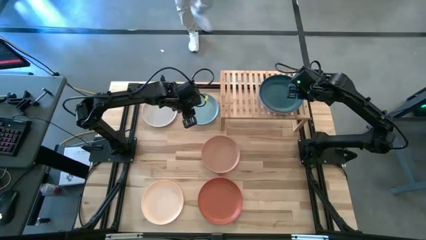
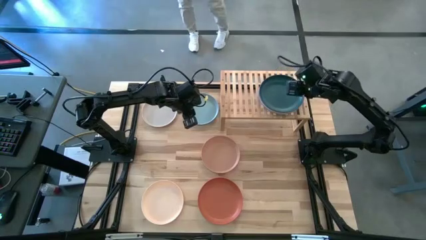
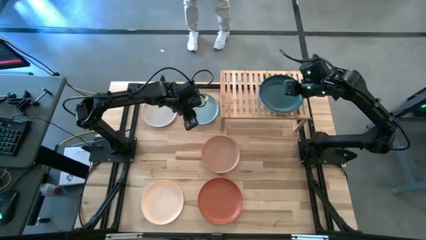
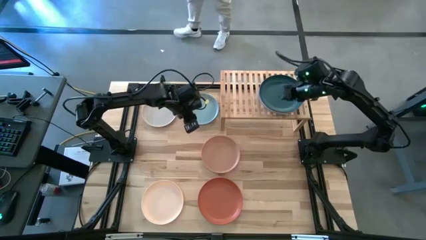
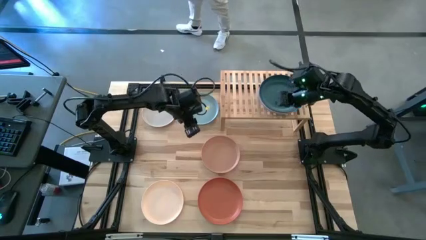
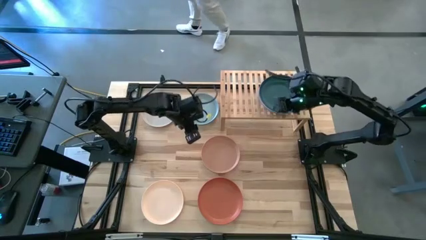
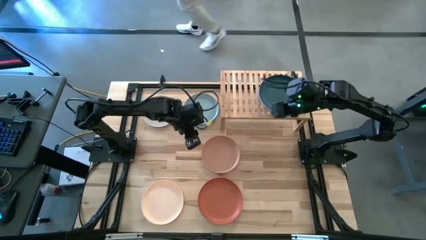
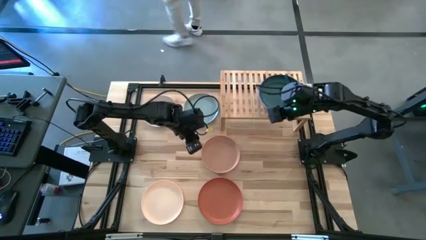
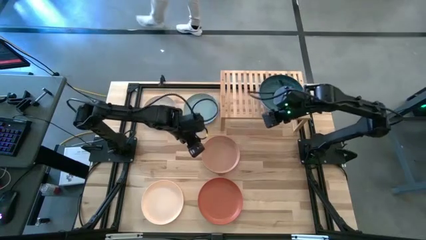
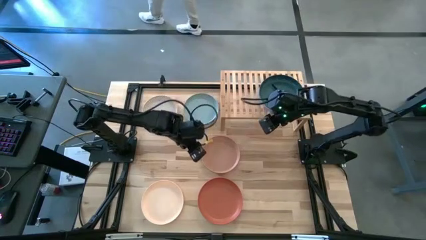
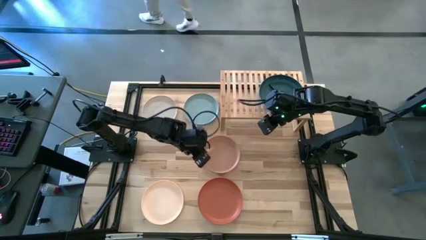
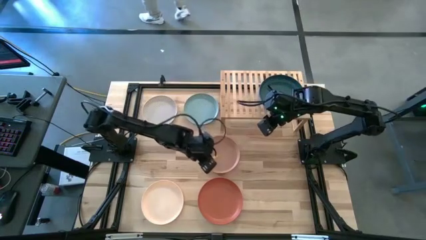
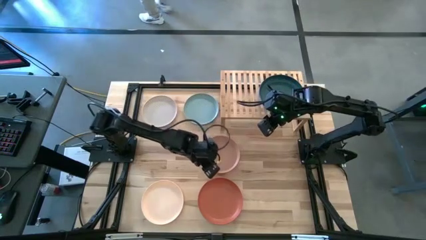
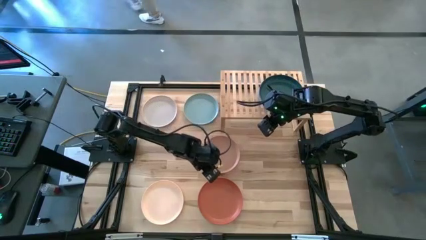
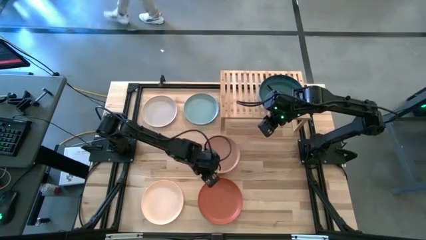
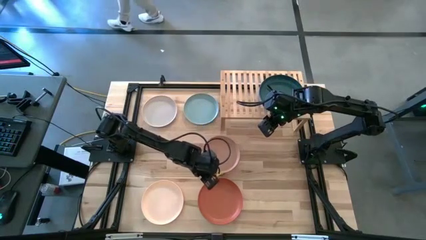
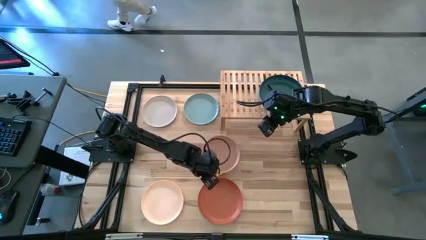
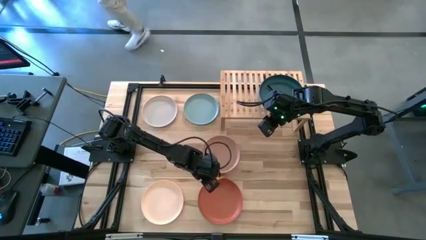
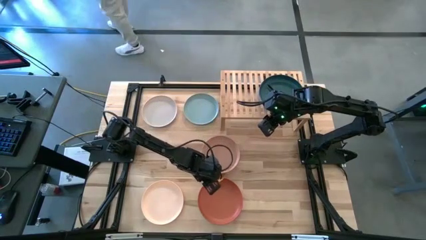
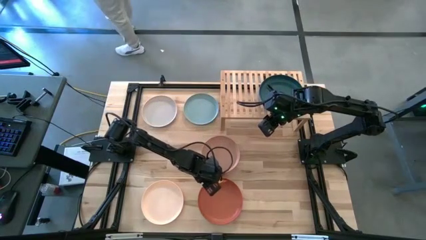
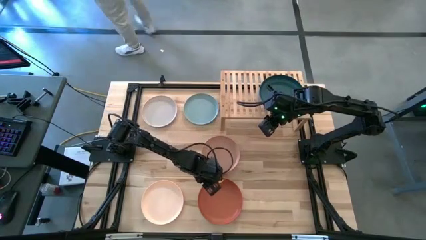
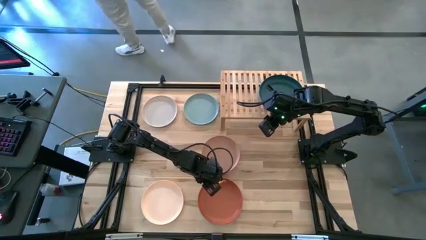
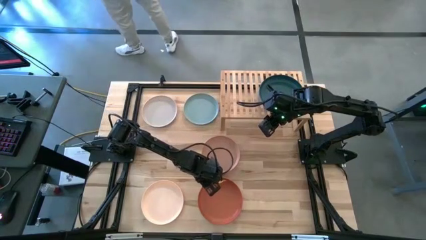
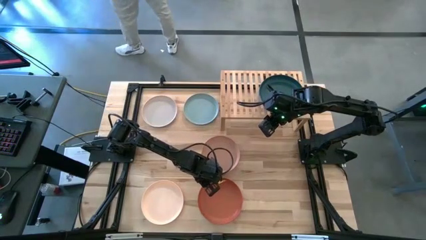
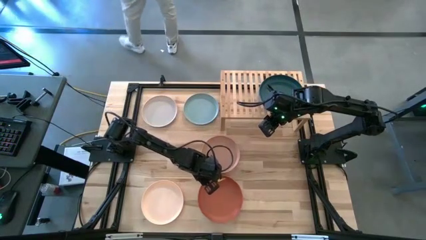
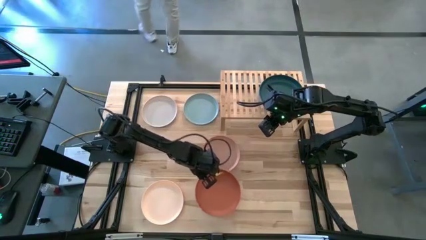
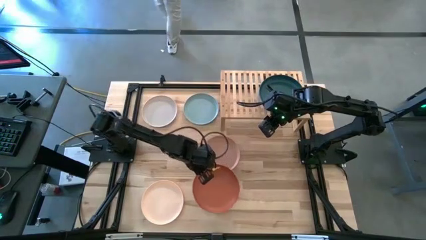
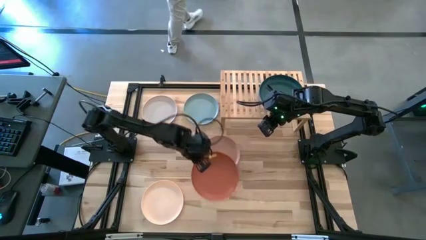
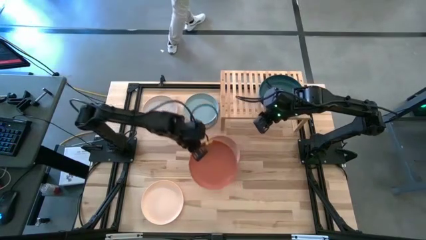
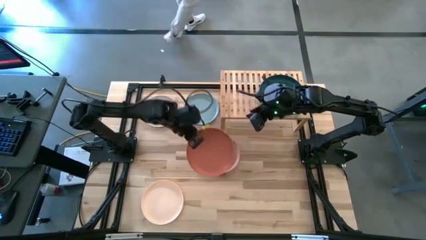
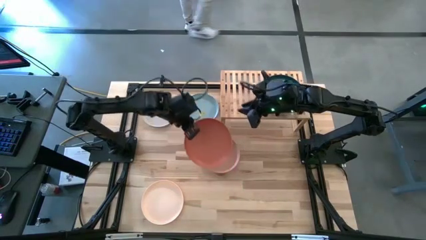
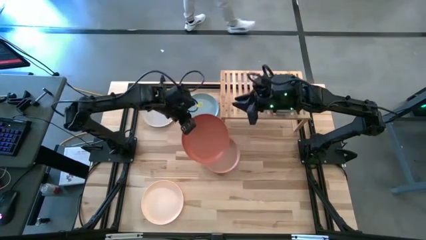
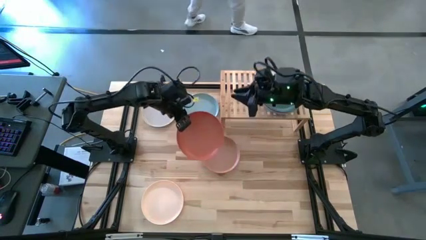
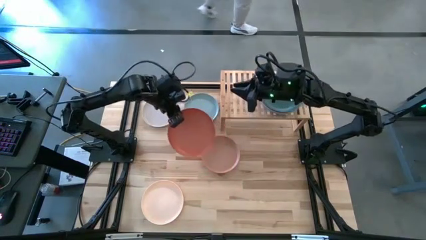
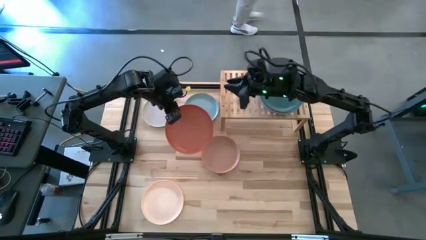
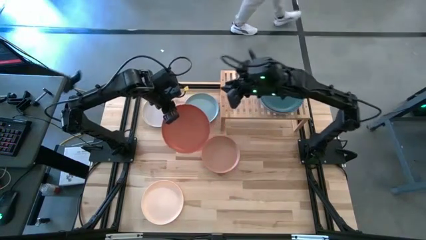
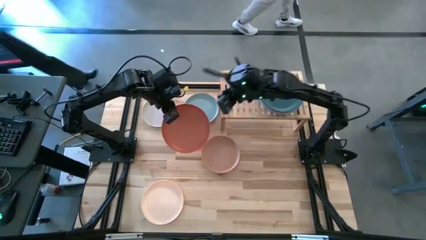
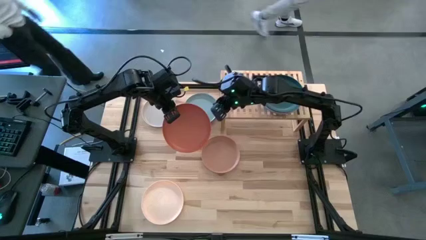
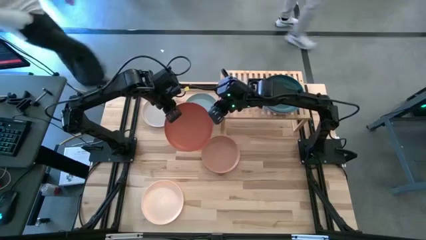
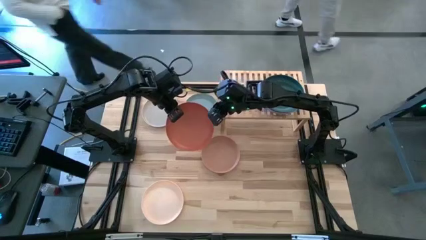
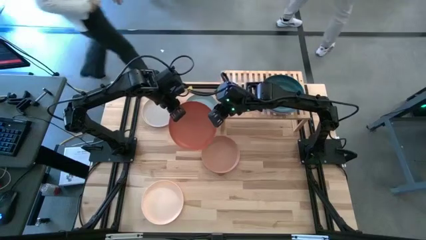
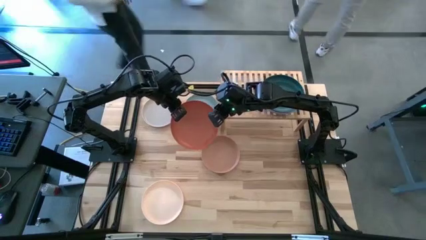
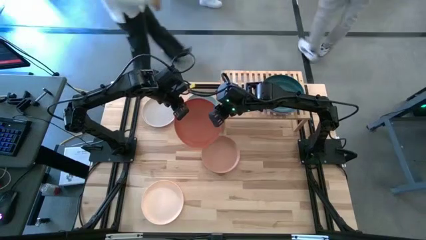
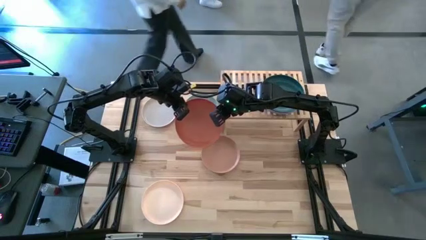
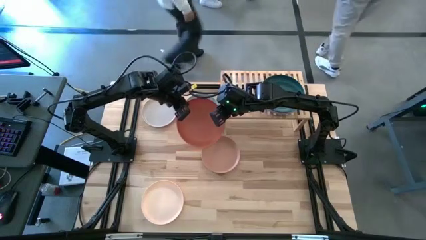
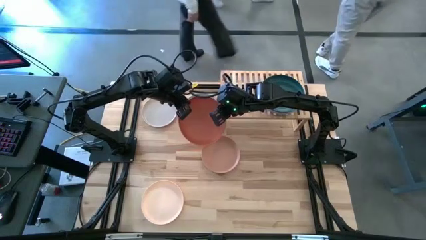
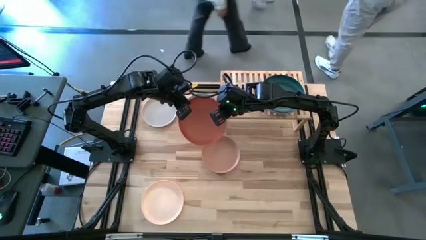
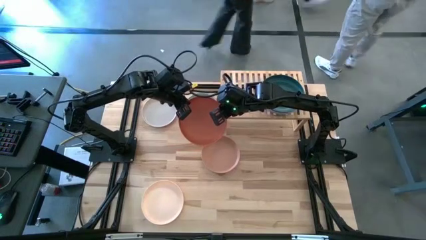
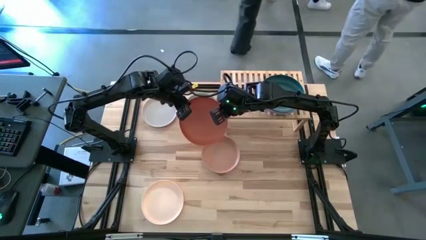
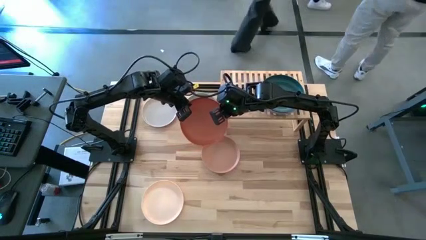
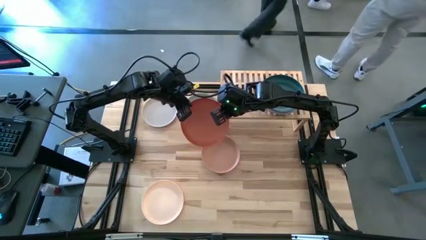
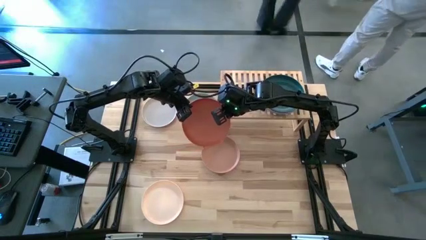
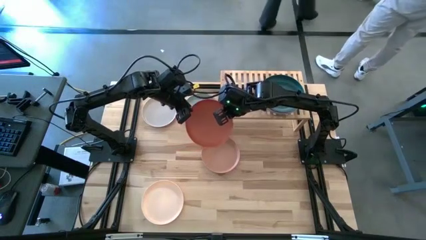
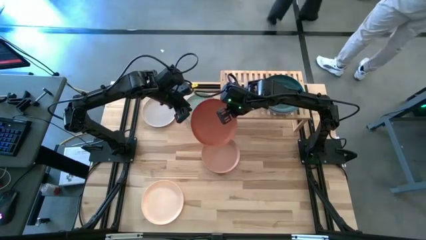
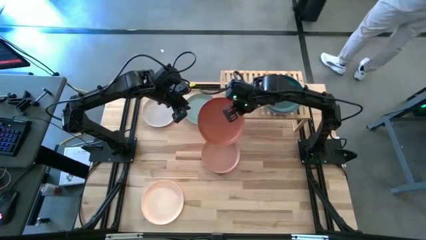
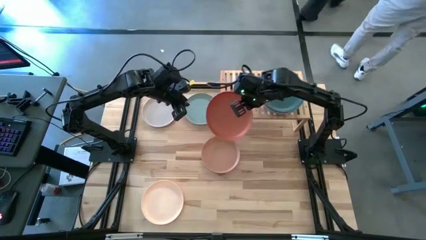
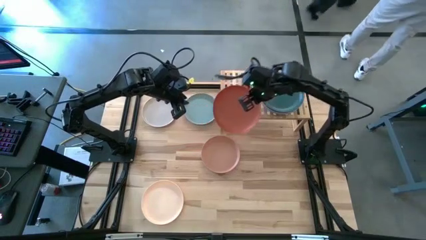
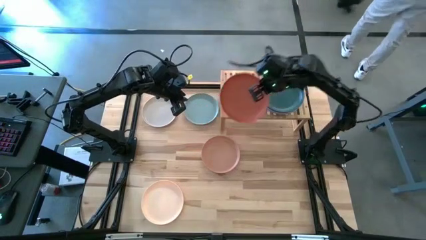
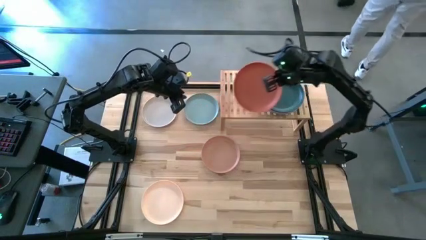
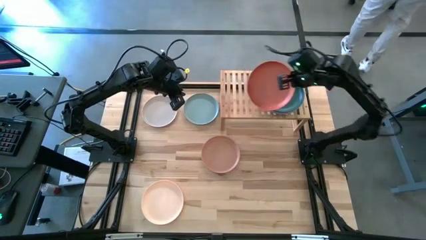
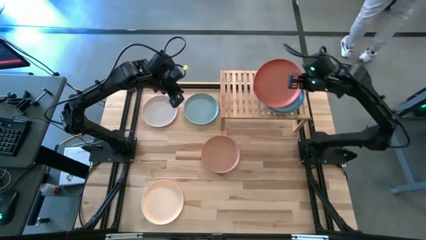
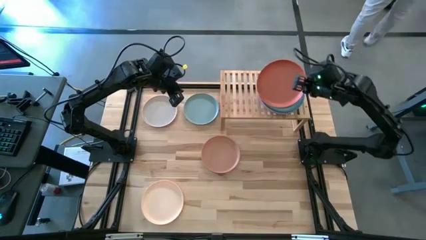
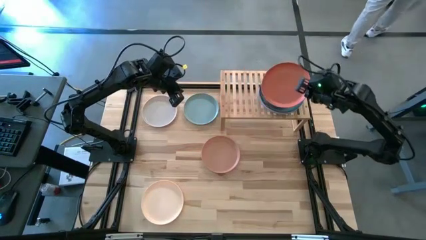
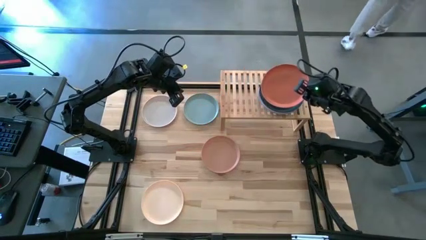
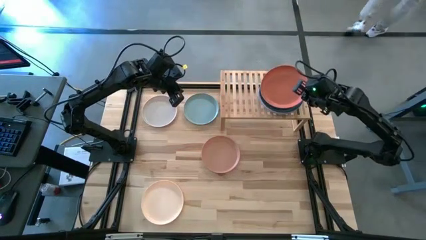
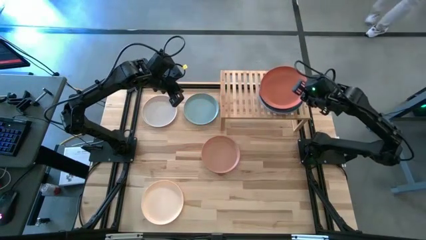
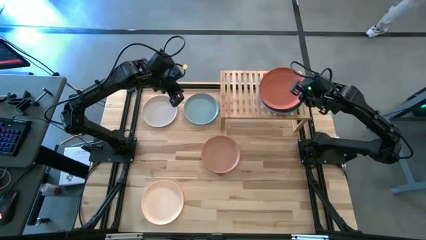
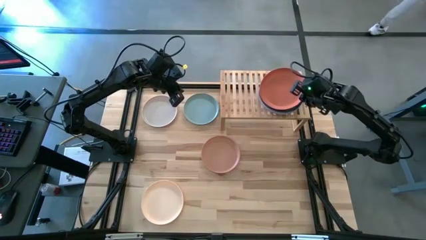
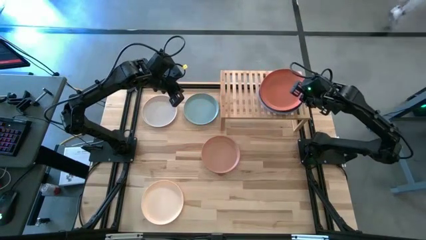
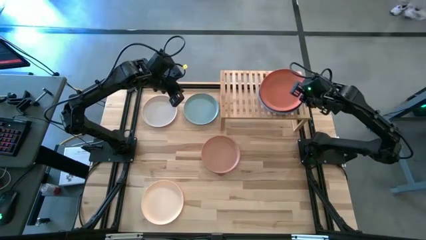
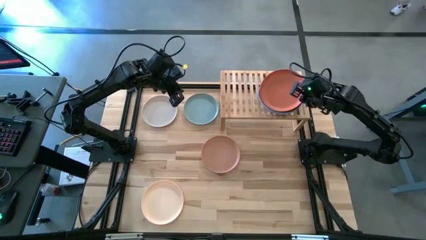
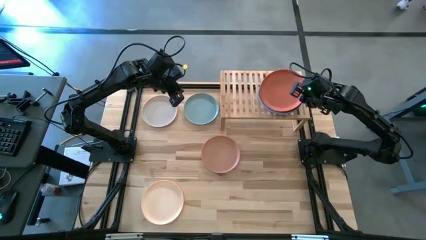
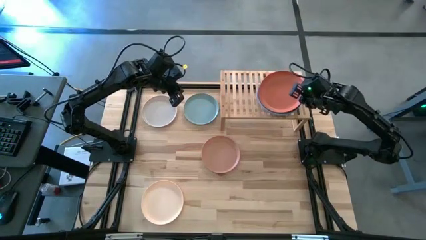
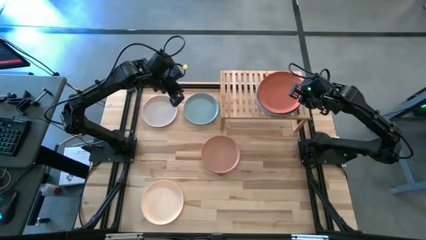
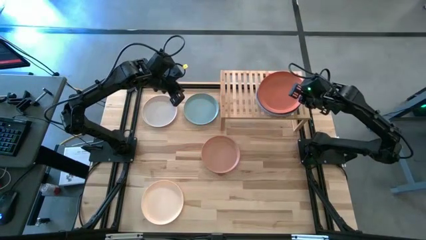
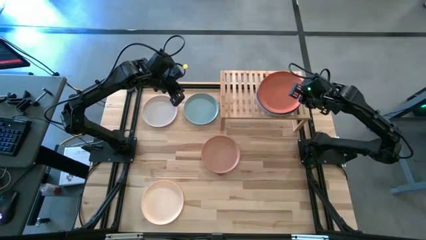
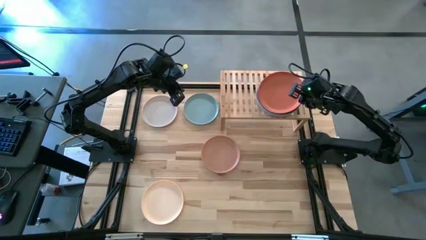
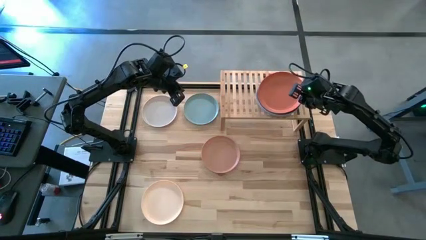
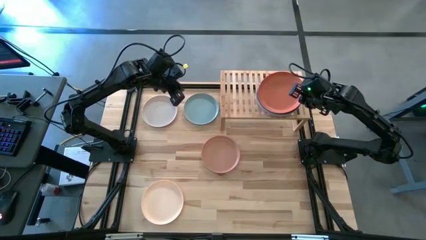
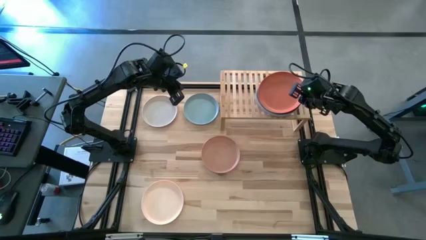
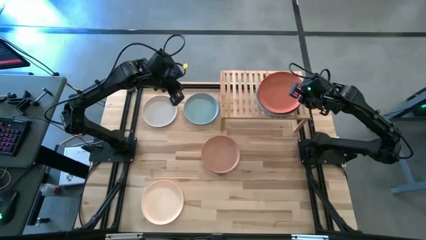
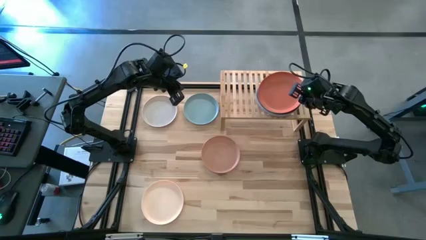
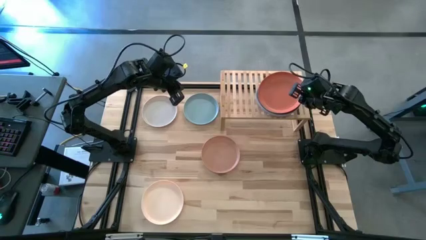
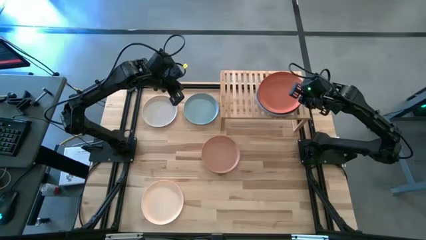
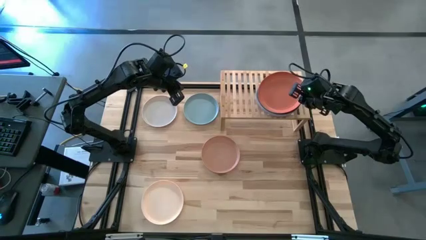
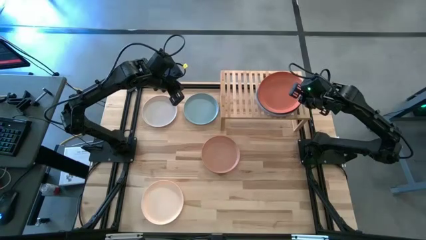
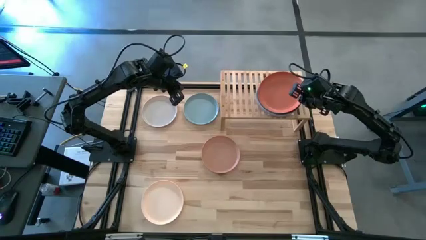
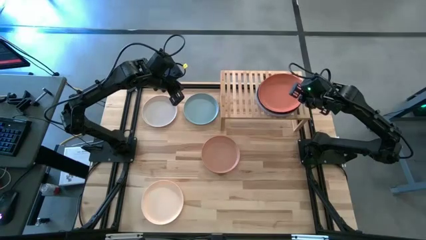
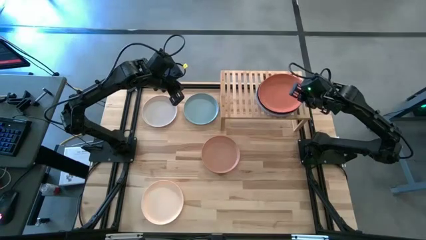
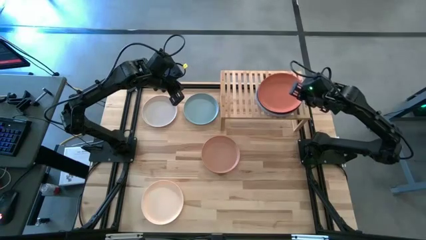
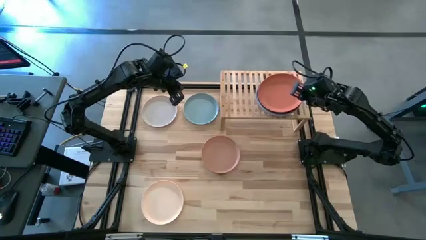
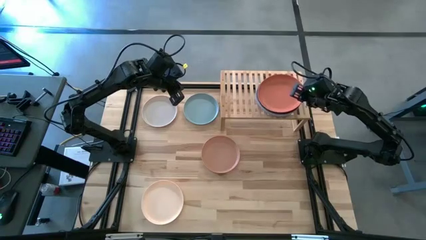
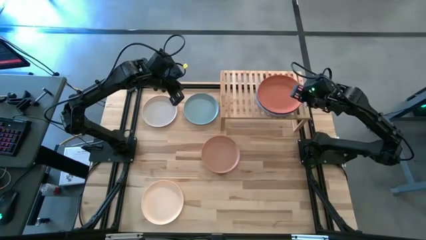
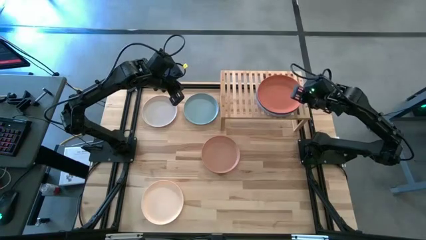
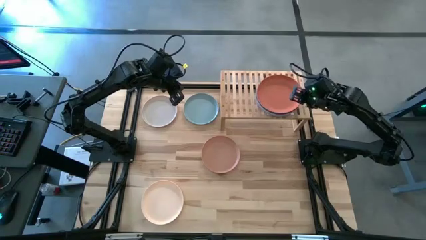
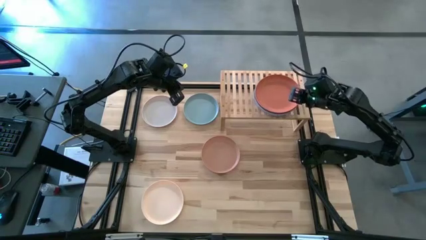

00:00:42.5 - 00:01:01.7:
Task: Place and stack plates onto a shelf
Stack the orange plate on top of the green plate on the shelf
